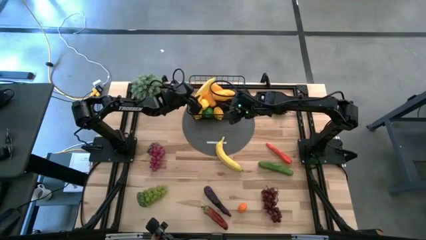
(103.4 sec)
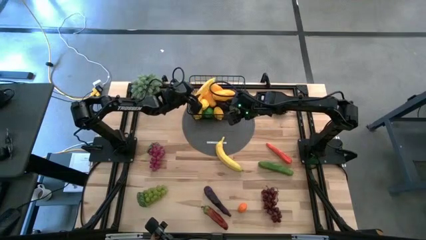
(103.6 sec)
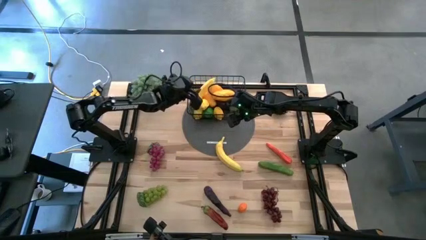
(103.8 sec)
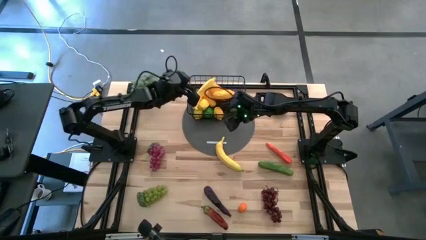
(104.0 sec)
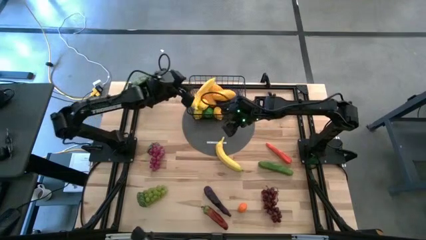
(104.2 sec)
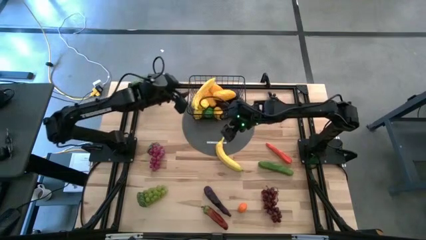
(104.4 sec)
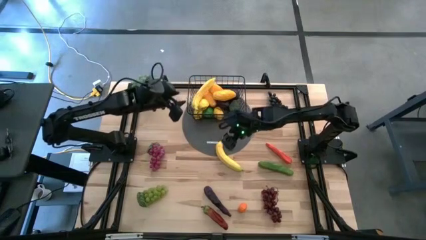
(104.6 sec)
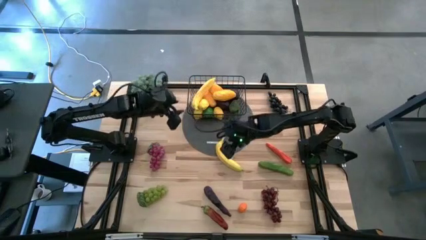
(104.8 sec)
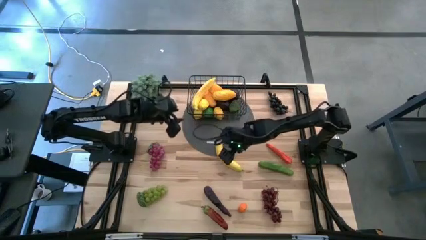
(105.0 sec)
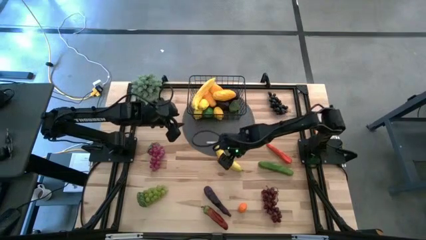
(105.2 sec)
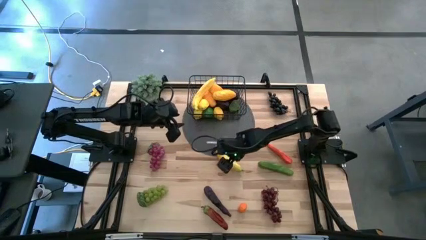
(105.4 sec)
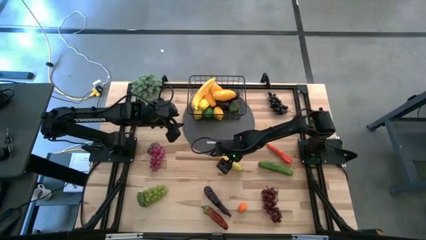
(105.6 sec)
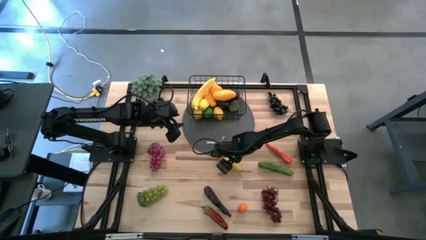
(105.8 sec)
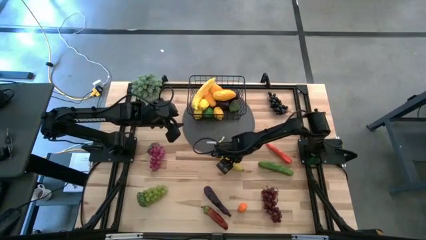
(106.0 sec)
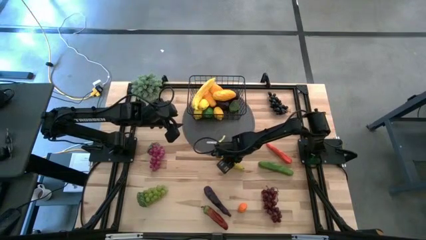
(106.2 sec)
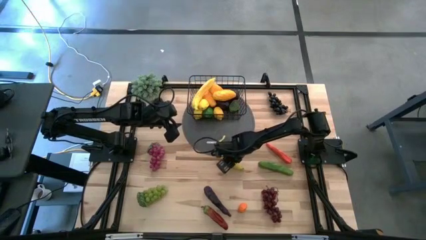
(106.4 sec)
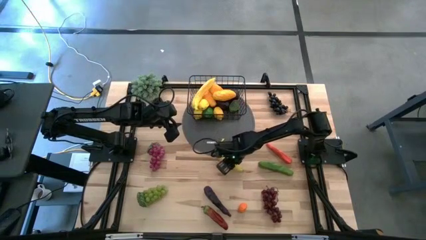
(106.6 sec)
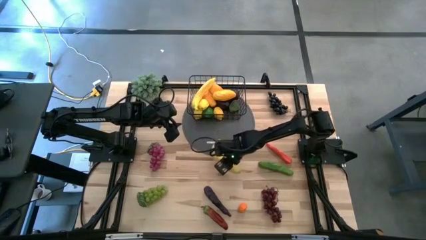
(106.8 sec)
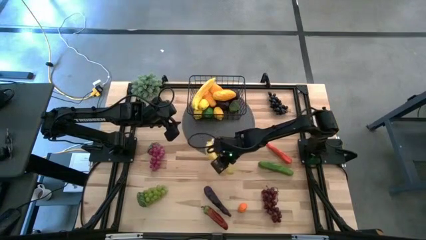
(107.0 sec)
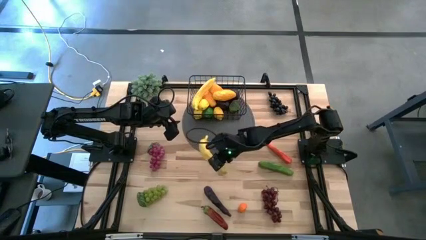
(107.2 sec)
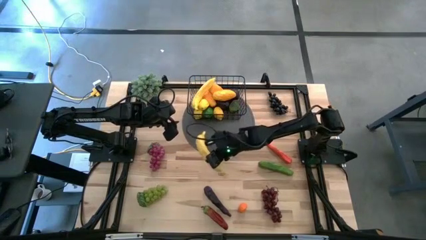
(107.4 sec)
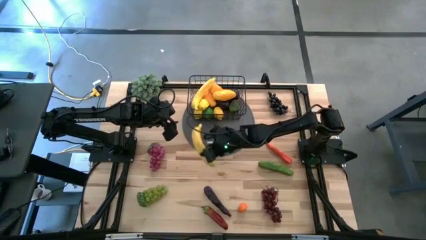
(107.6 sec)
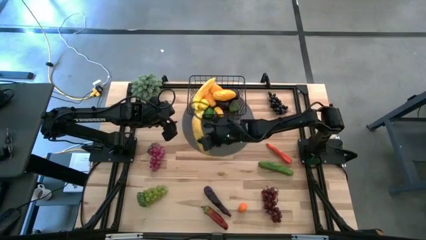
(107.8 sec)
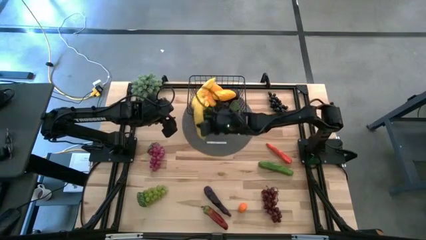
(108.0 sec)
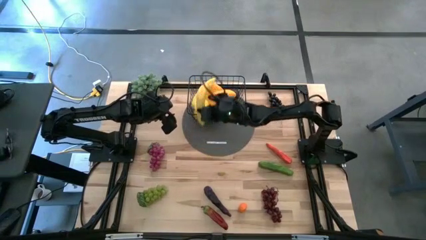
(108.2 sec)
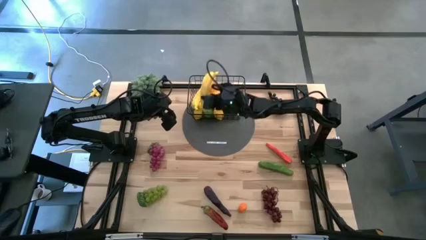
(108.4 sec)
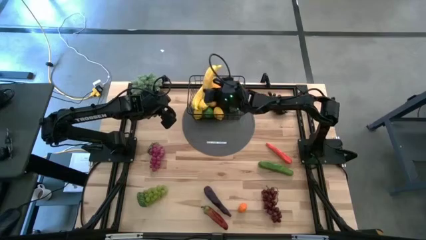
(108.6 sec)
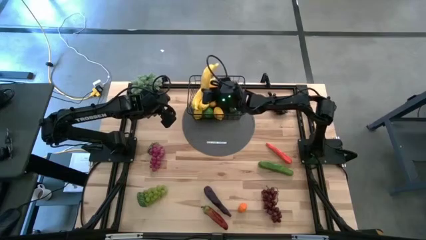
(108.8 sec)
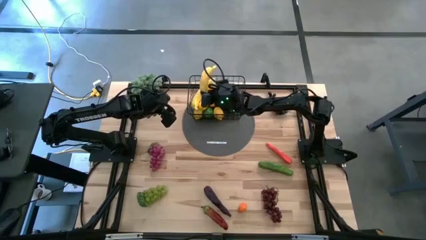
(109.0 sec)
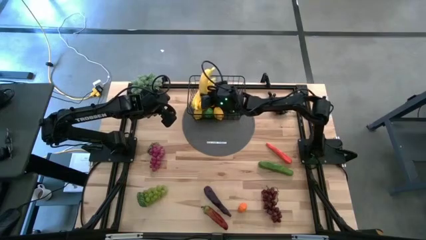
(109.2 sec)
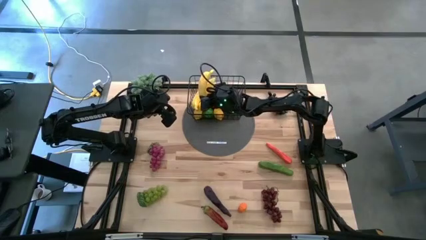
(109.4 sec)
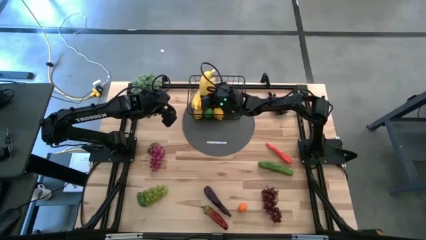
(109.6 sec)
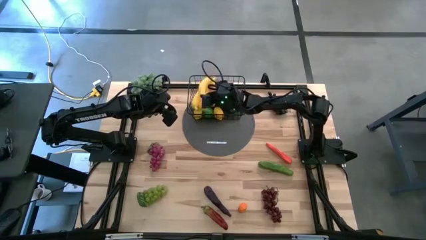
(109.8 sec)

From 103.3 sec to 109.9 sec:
Task: Build produce basket
Put the yellow banana into the black wire basket

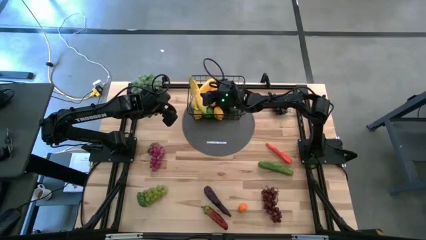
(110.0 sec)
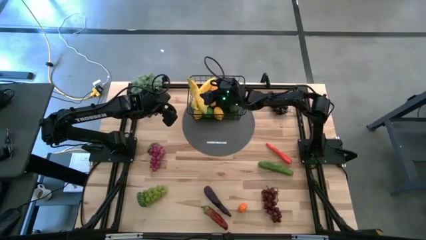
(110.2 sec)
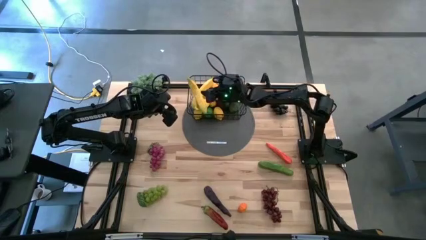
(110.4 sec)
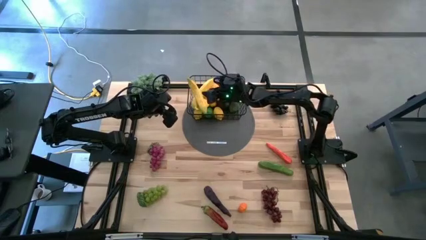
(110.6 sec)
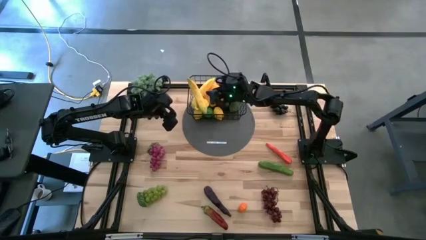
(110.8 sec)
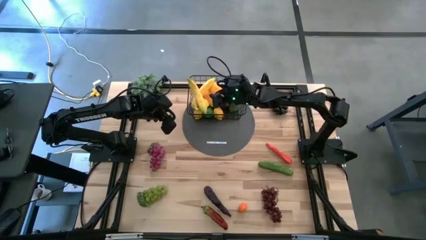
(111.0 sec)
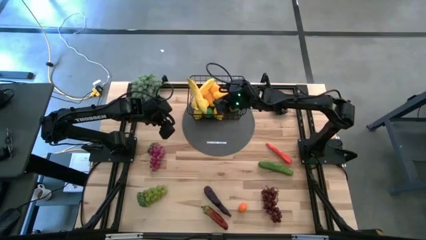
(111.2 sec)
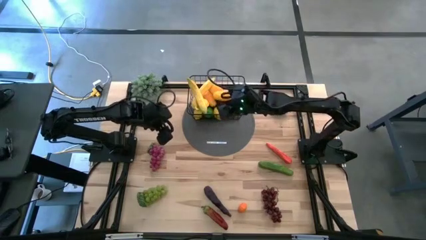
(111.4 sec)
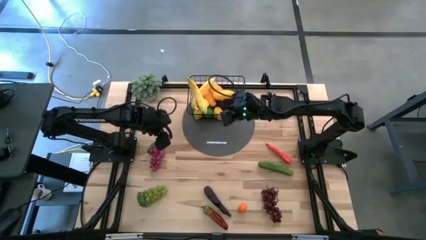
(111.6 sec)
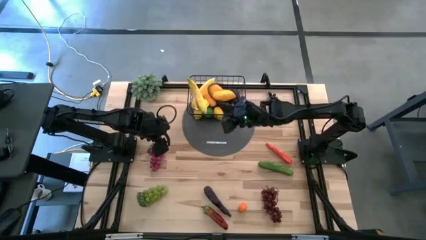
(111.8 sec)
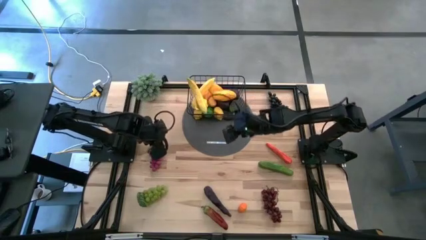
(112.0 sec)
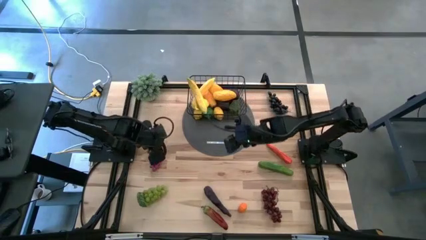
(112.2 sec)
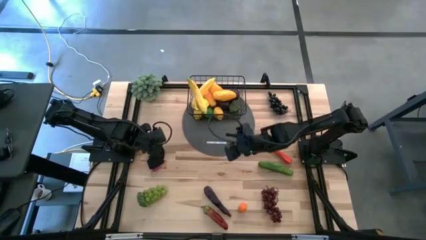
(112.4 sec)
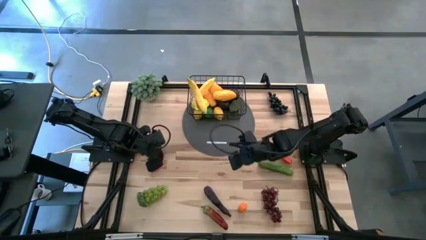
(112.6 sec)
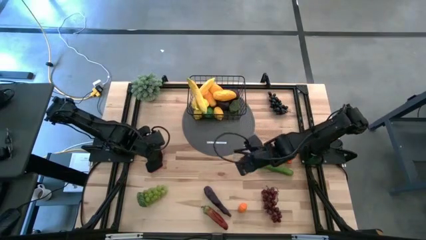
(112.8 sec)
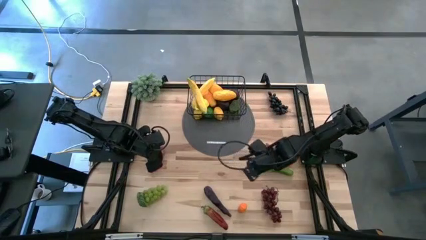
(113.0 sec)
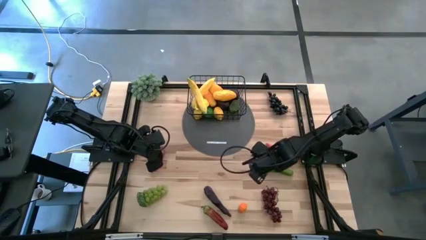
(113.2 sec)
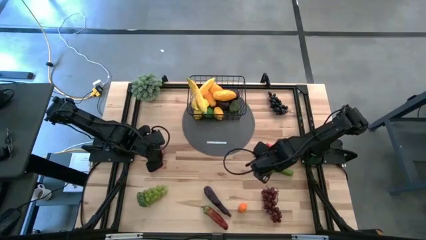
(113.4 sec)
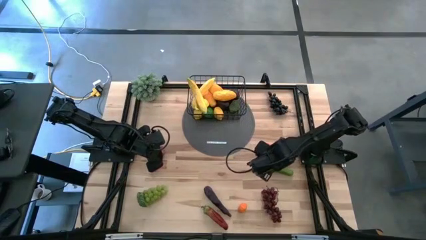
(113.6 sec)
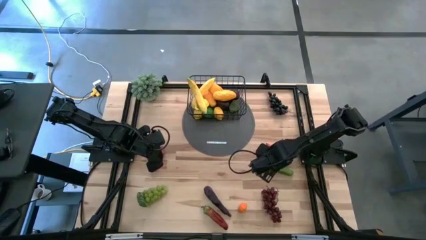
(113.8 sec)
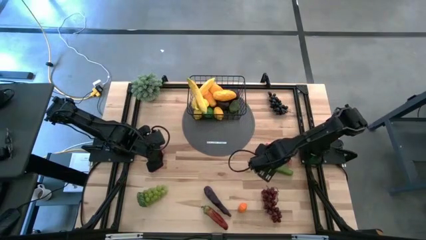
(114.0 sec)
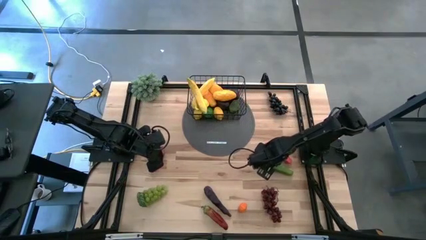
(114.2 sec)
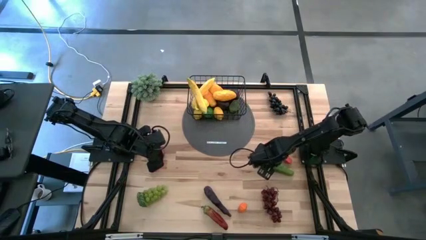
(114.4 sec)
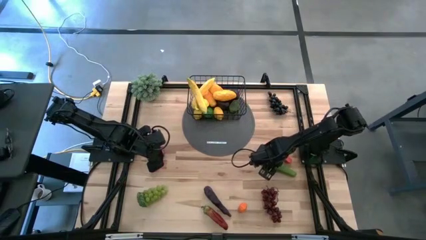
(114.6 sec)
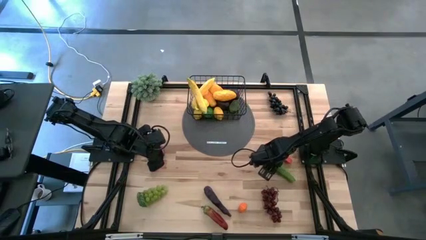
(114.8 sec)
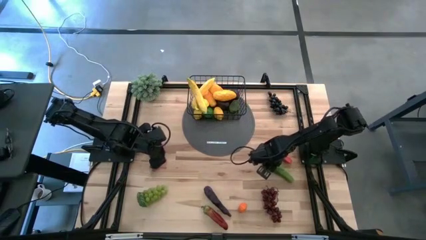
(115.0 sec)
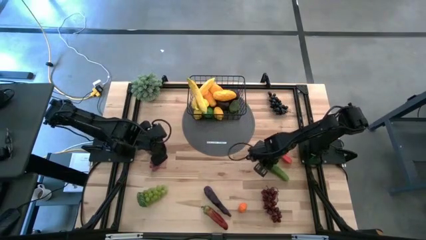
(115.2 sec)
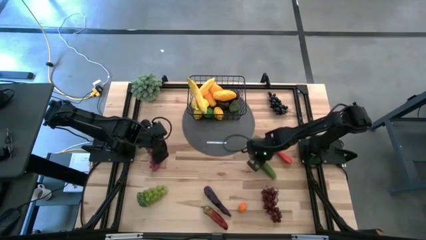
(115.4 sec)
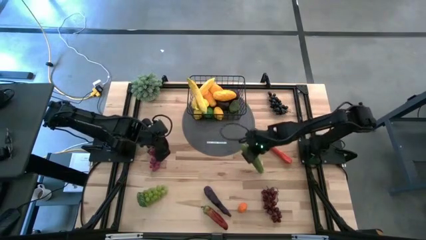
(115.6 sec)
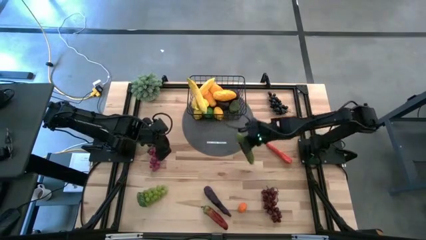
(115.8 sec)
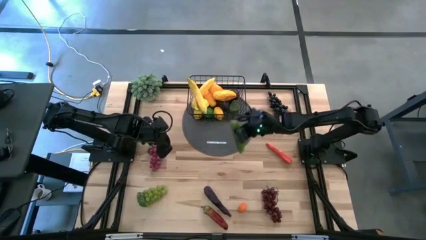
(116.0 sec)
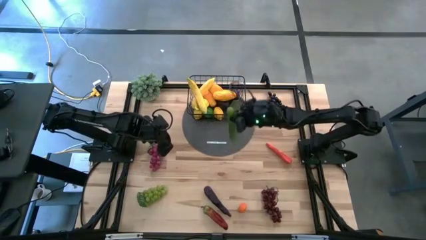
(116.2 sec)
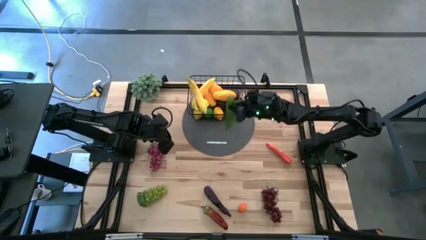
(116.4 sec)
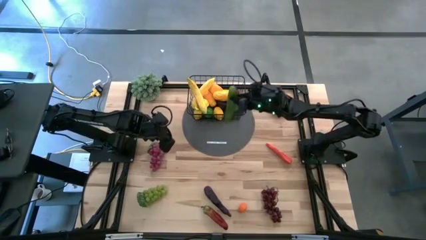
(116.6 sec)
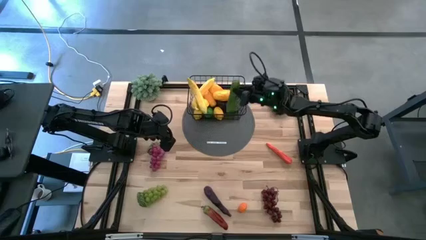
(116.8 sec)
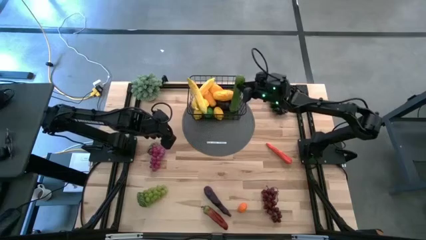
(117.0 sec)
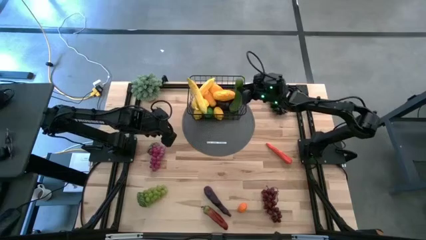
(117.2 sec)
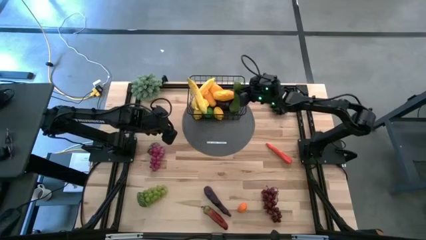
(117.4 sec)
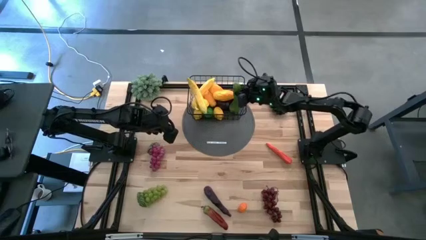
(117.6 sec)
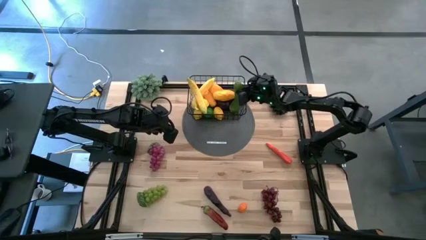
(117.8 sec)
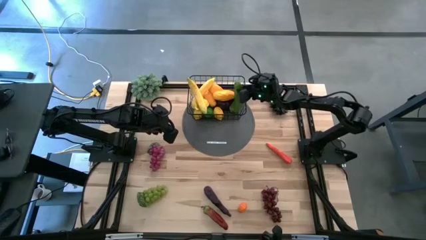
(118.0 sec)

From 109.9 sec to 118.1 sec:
Put the green cucumber into the black wire basket
